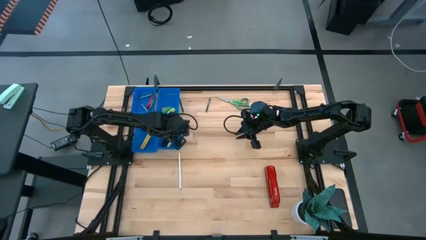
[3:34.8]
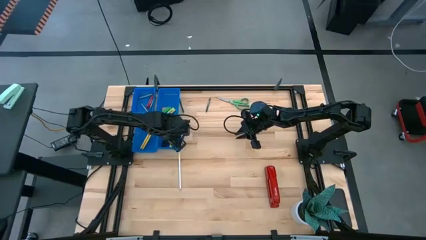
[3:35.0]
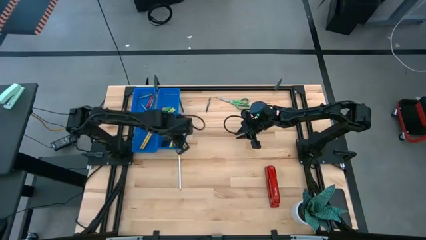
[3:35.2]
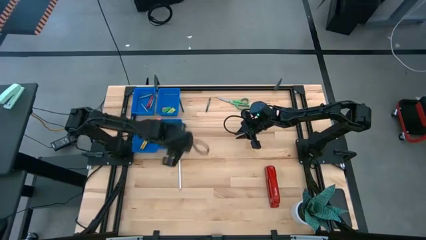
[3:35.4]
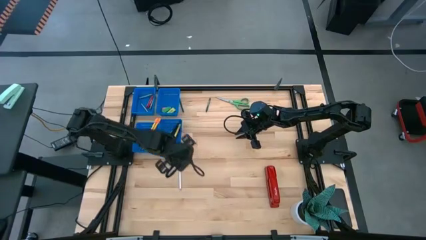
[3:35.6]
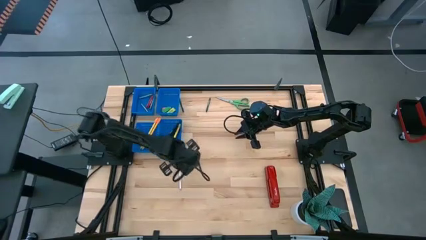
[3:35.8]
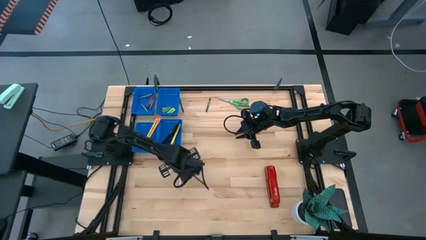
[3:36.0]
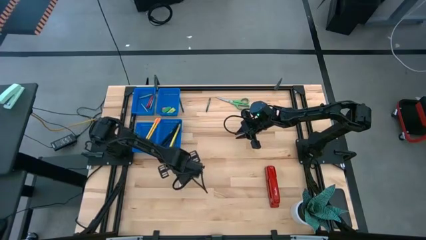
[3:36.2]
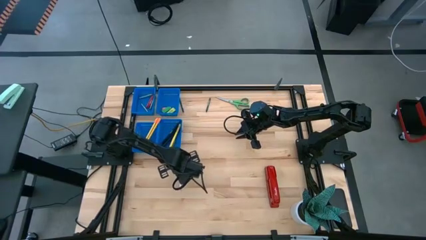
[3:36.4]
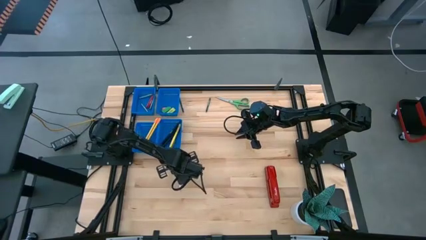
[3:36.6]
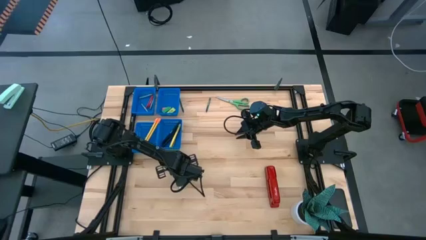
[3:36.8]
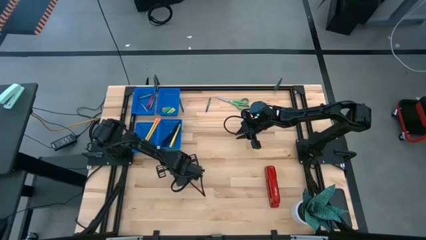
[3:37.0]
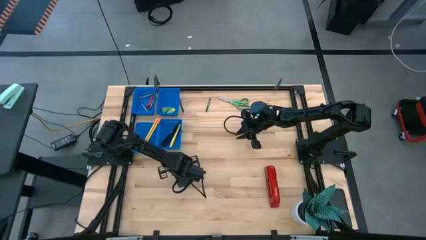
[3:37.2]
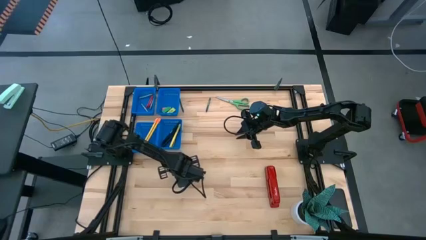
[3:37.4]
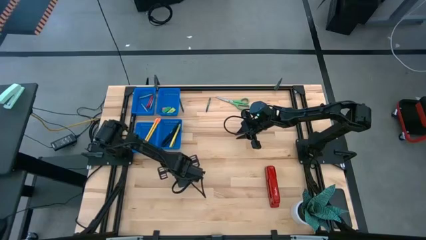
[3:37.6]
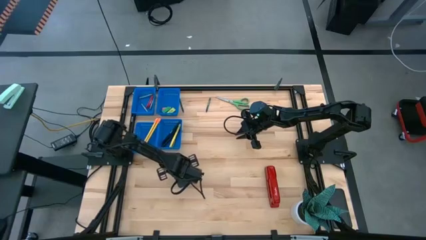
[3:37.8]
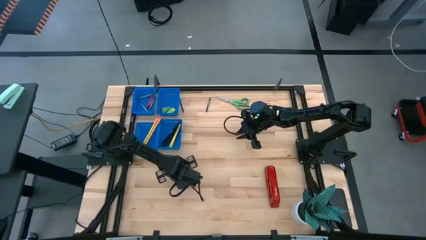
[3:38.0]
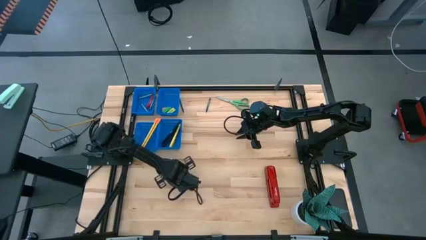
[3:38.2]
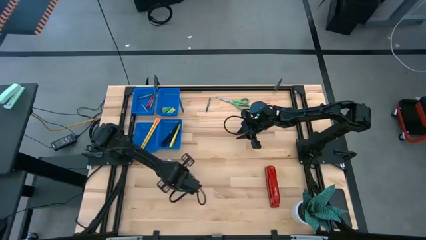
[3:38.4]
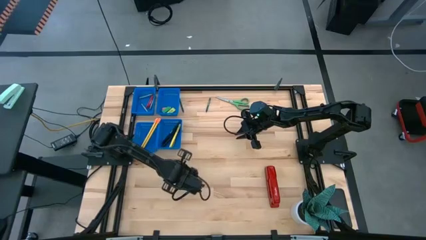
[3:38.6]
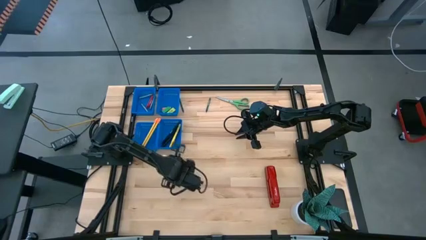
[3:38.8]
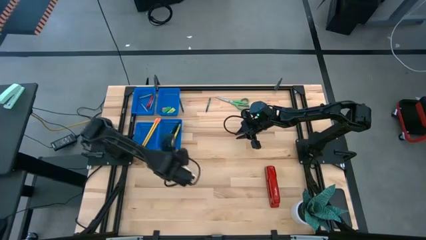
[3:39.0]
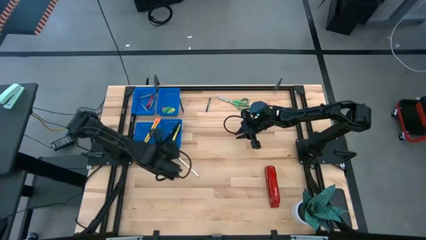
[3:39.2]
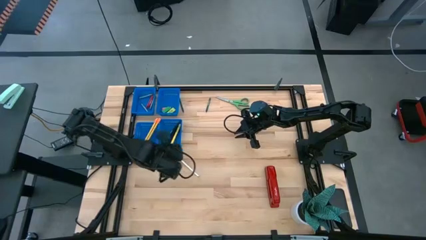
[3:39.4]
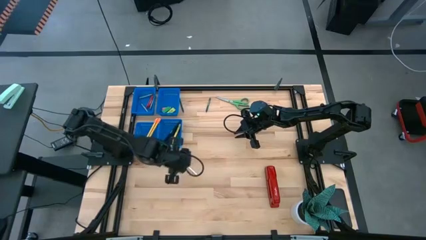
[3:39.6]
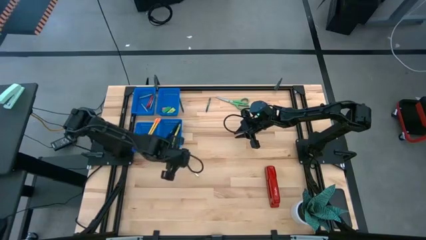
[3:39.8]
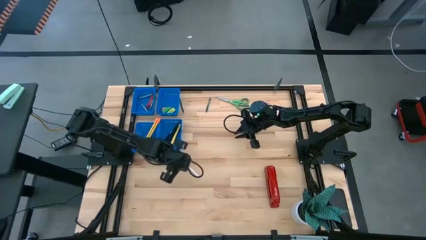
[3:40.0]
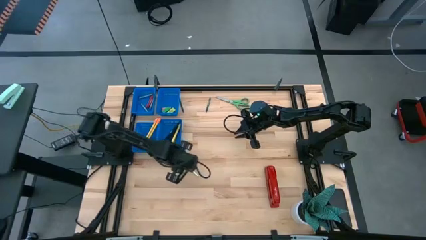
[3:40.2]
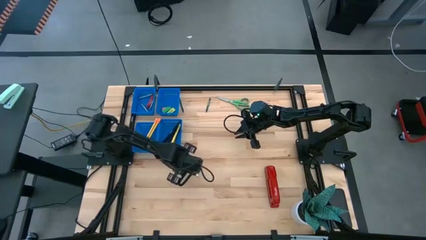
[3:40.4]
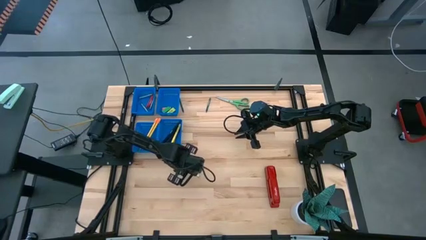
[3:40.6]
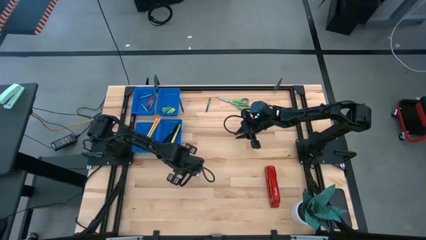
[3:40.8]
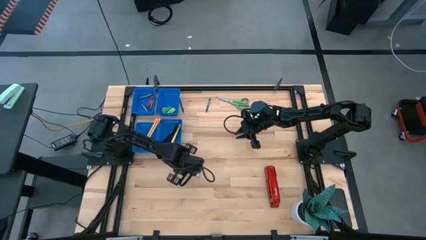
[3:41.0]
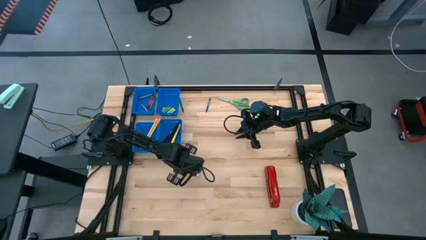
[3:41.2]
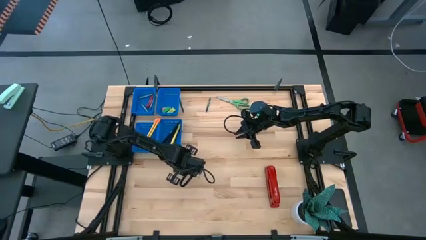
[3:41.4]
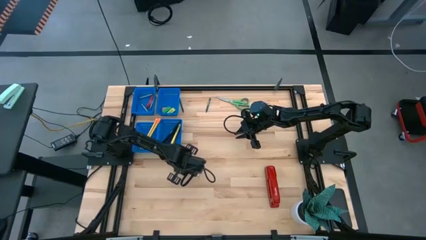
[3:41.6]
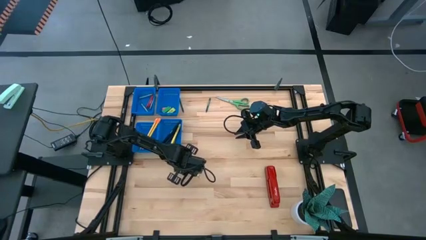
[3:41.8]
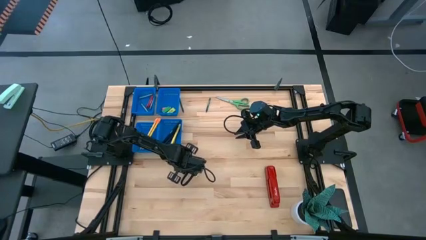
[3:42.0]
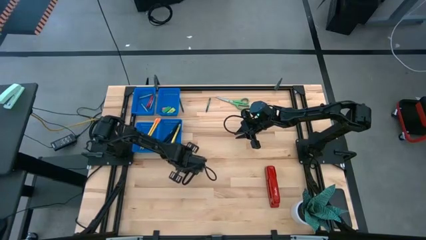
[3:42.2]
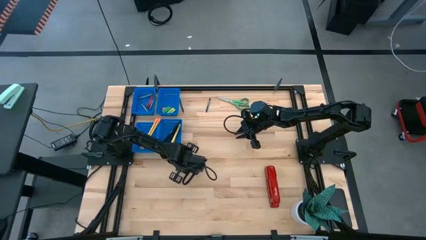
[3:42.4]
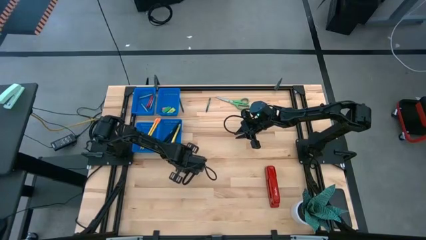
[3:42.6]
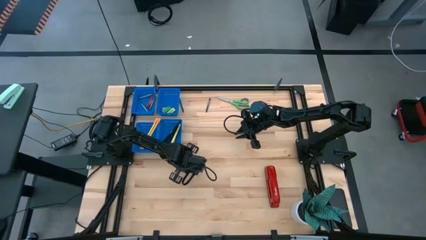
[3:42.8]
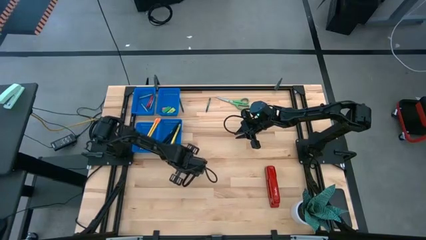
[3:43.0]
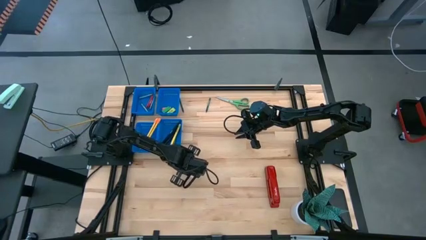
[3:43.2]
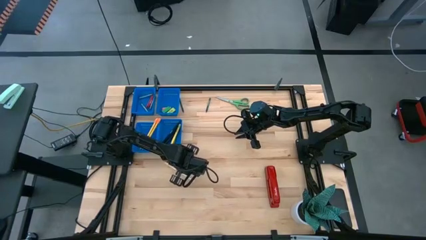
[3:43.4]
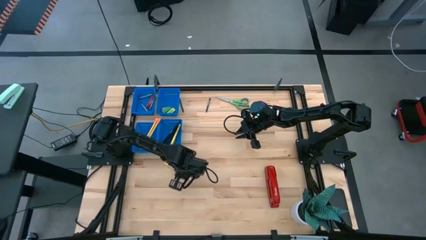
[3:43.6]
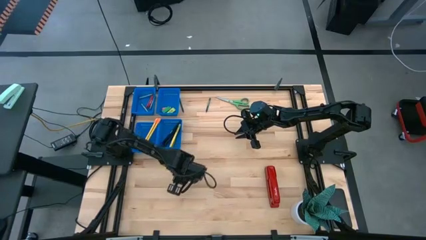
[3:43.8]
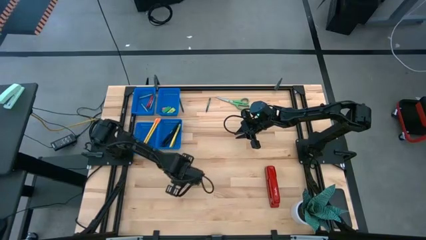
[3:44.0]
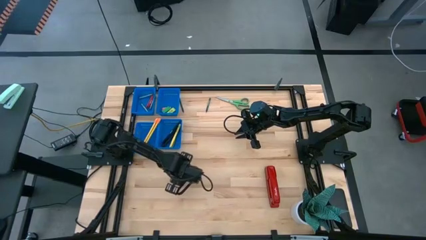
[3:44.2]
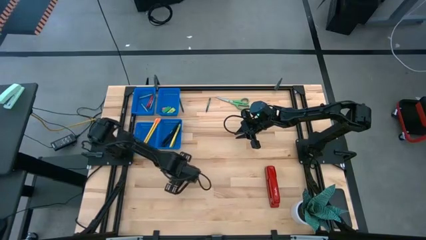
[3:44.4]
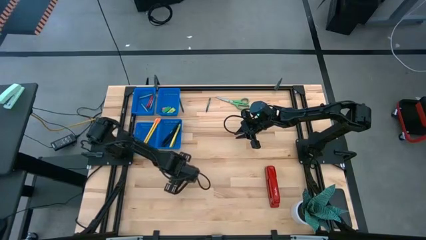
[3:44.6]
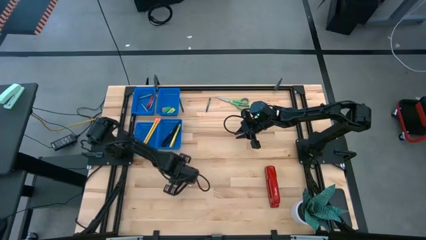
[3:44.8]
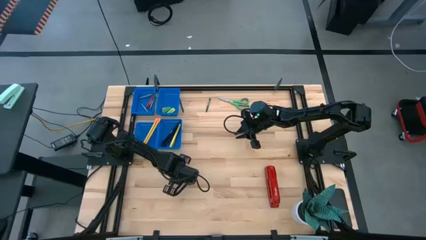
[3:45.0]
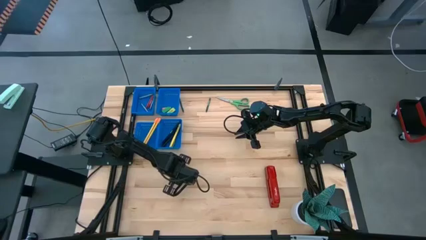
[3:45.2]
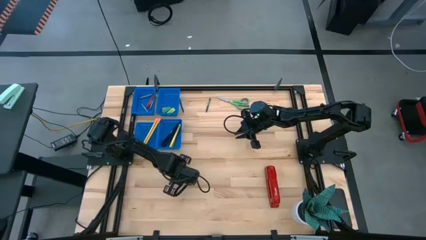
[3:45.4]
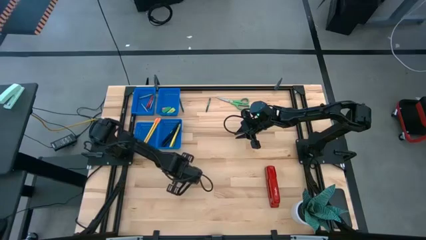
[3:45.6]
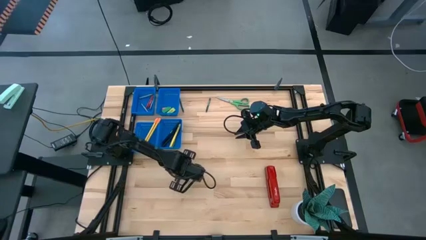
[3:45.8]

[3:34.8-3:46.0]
Task: Sort crayons/erasers/pens/pencils in bins
Put the white pencil into the bottom left blue bin

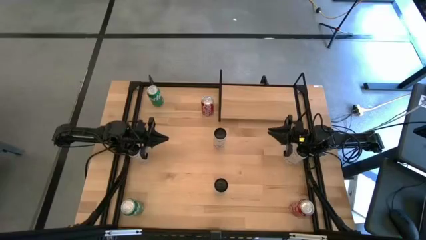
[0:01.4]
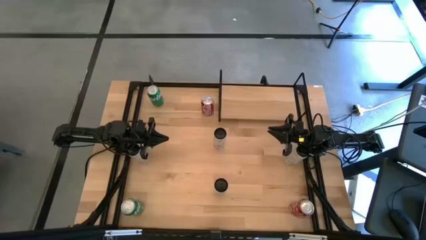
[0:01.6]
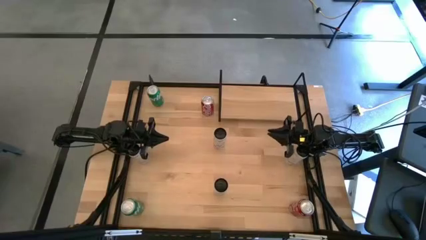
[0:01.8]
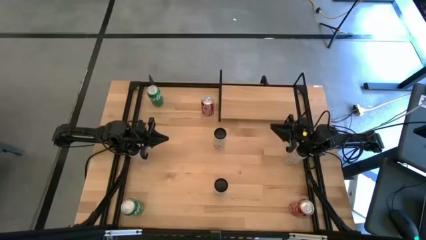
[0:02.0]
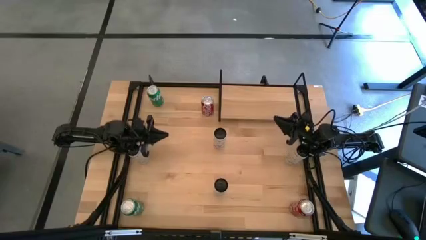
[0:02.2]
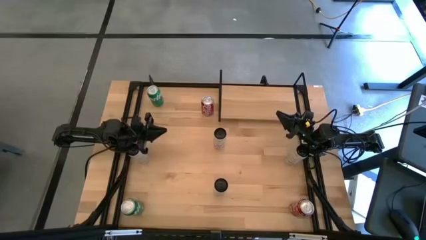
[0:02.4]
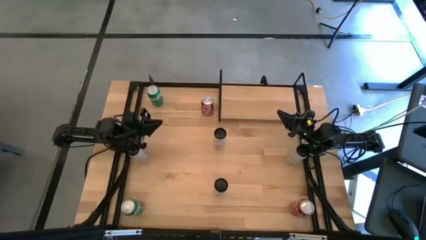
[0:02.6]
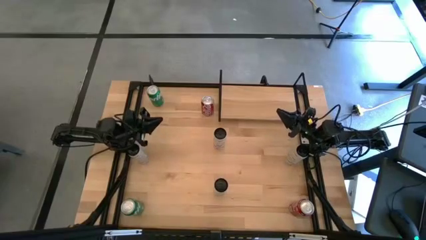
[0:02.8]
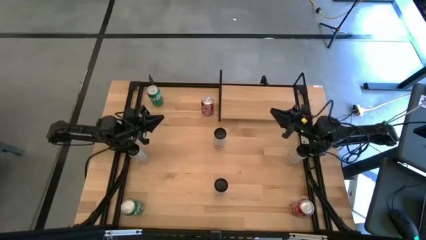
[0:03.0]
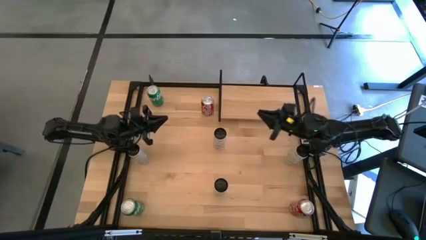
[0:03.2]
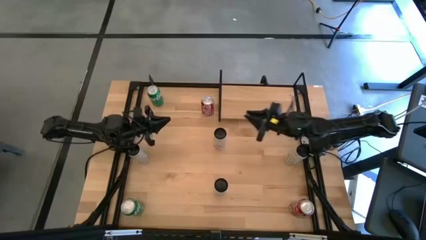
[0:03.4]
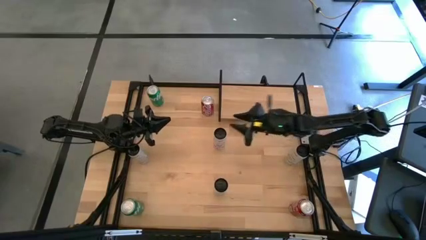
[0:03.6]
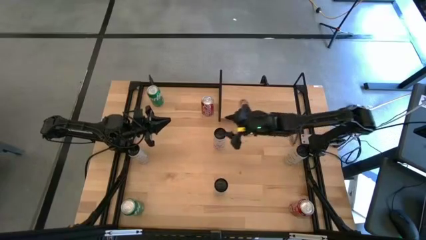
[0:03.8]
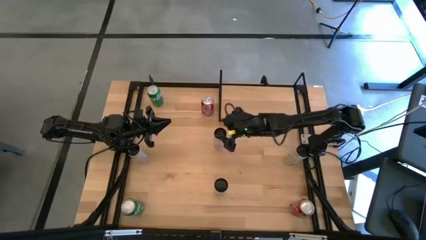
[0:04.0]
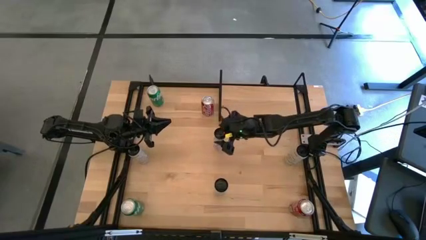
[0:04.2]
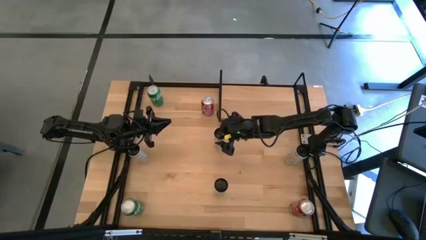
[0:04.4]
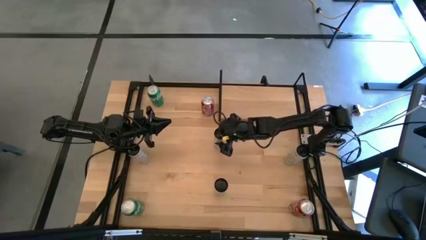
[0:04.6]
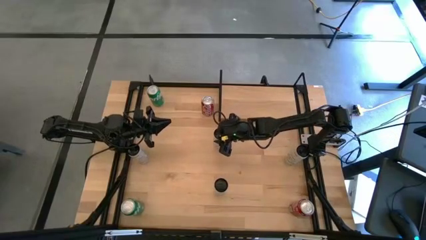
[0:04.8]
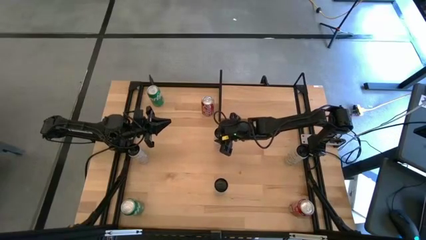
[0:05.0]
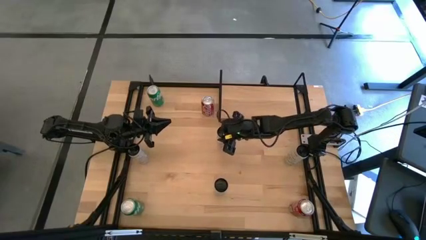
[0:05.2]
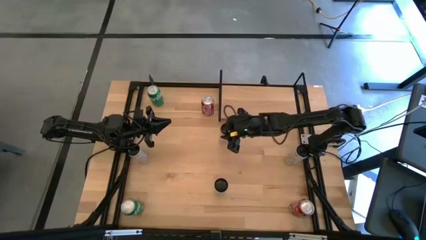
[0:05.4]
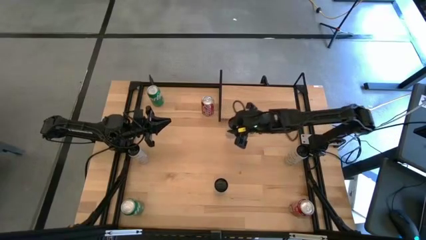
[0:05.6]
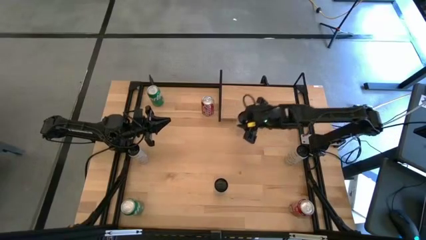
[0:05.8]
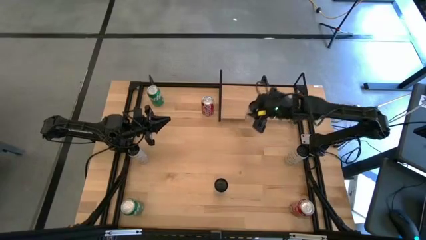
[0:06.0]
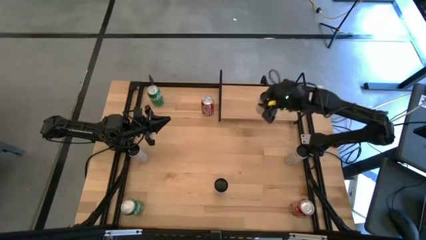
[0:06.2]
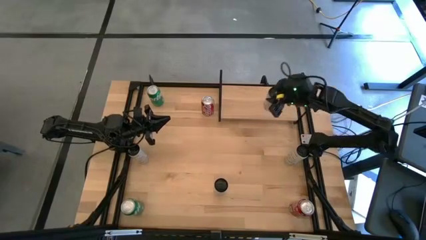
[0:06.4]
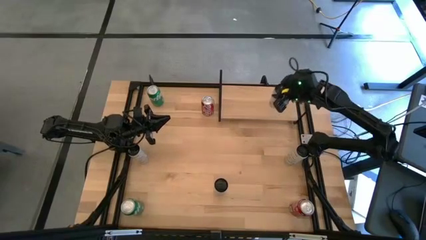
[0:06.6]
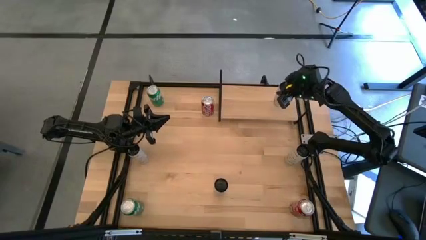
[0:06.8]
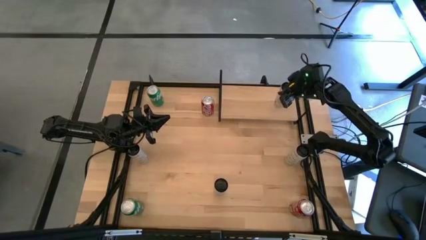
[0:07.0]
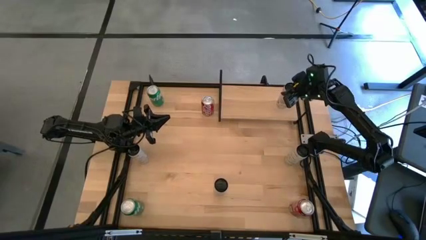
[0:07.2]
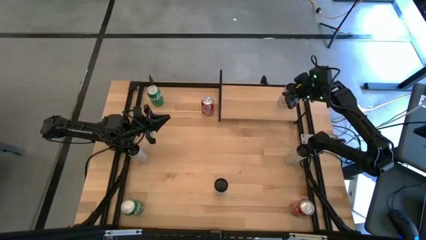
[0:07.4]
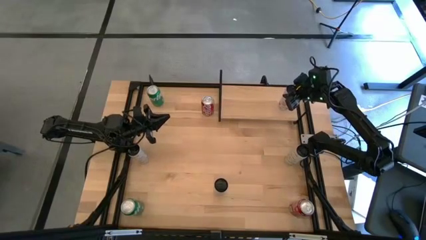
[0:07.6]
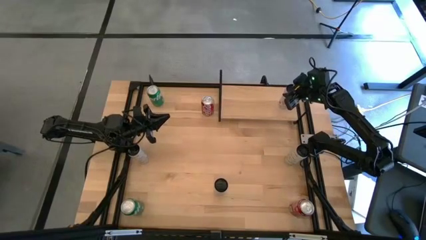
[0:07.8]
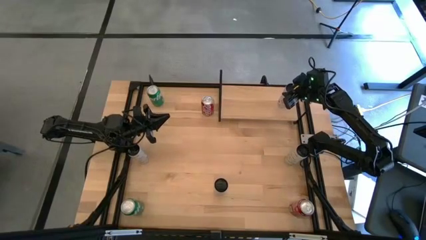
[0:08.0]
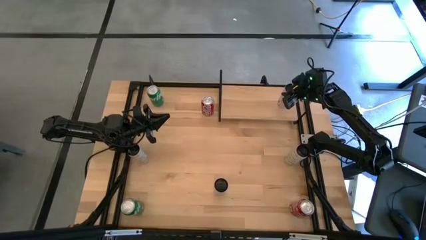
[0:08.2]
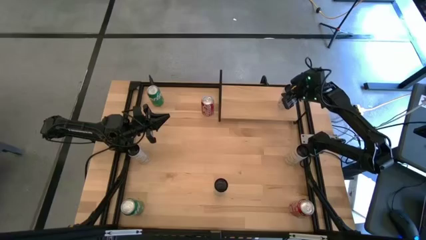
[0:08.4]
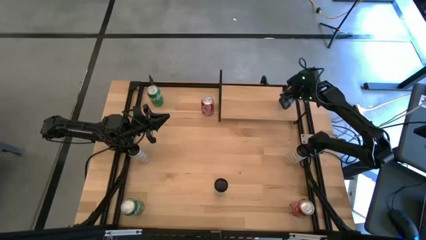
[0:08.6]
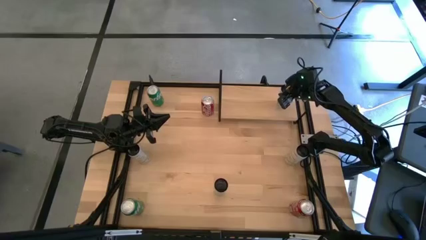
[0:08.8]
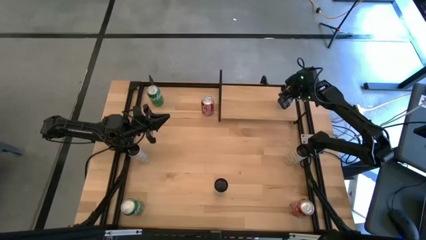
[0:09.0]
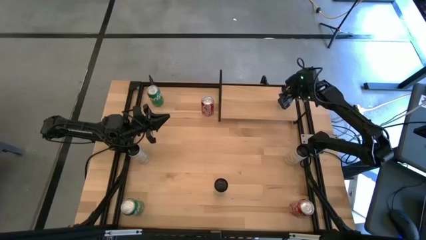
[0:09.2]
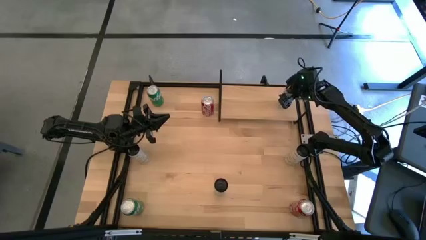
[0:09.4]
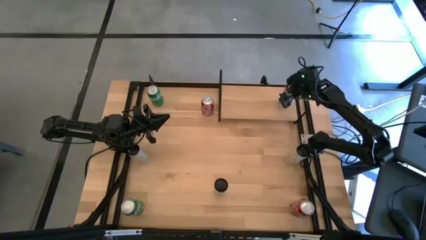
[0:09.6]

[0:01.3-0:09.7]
Task: Place canned beverage on shelf
Put the top white pink soda can on the shelf
